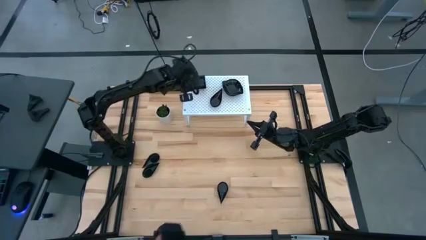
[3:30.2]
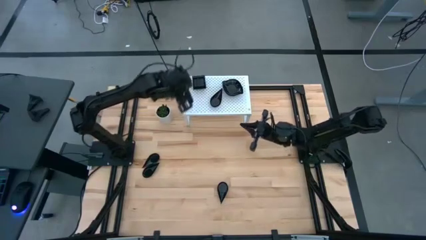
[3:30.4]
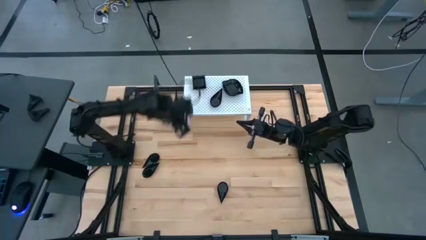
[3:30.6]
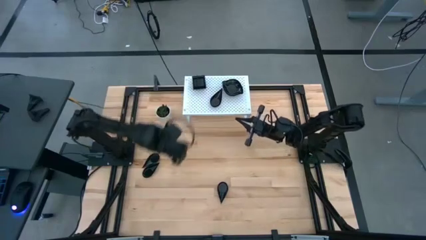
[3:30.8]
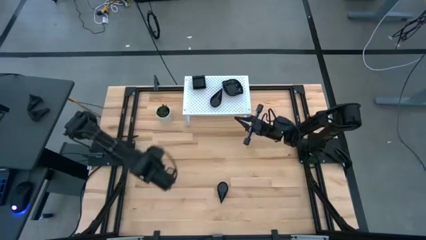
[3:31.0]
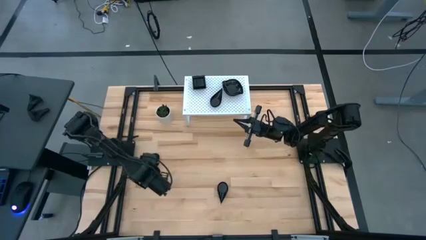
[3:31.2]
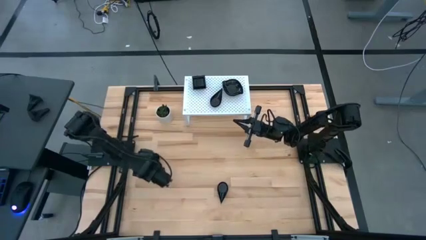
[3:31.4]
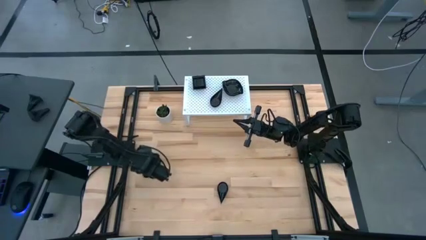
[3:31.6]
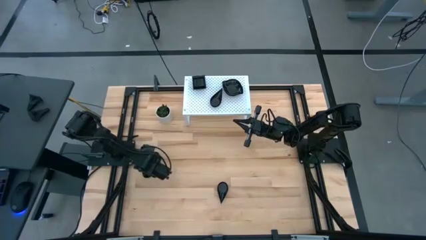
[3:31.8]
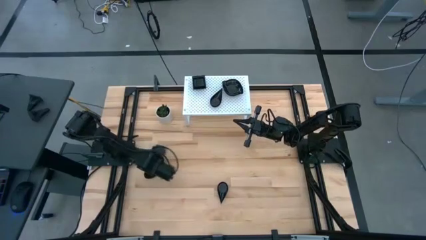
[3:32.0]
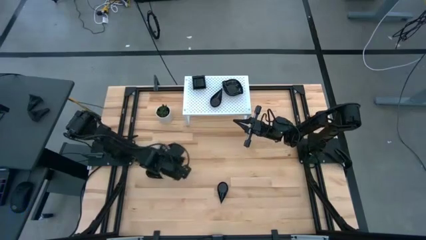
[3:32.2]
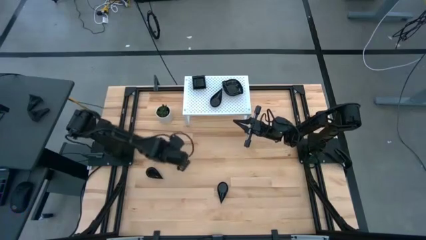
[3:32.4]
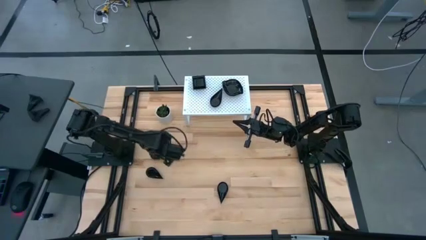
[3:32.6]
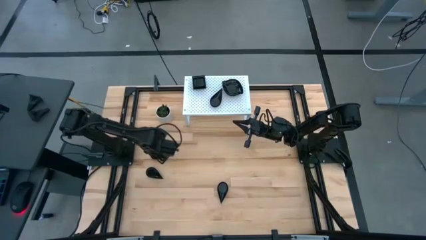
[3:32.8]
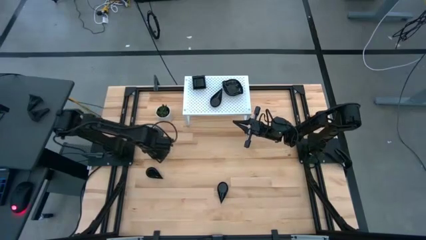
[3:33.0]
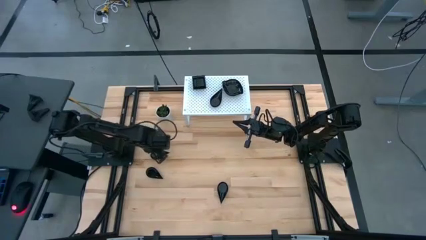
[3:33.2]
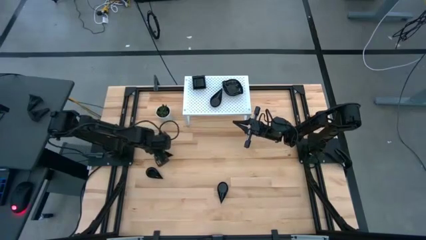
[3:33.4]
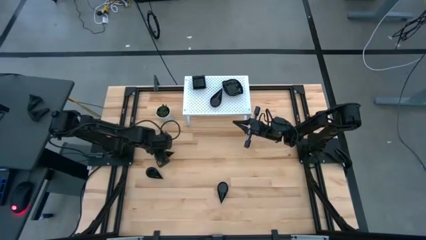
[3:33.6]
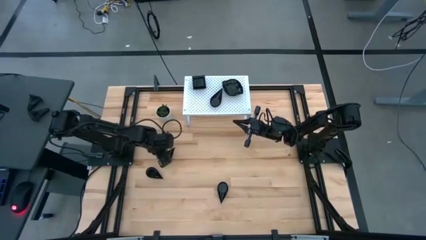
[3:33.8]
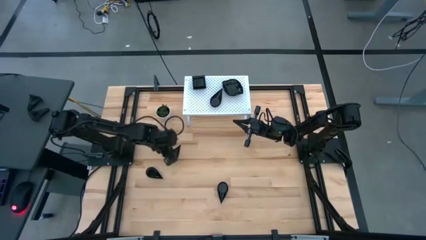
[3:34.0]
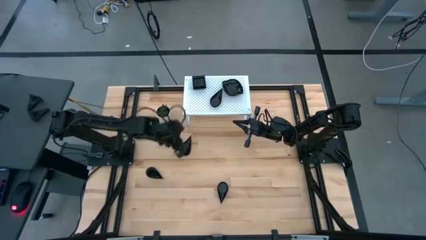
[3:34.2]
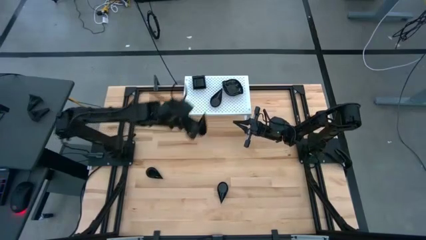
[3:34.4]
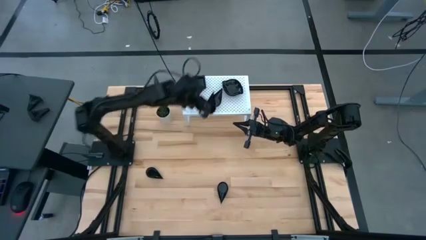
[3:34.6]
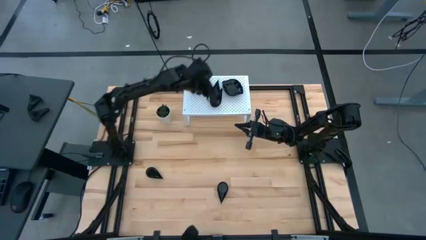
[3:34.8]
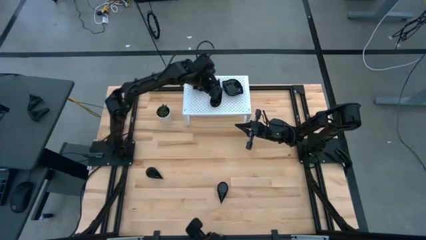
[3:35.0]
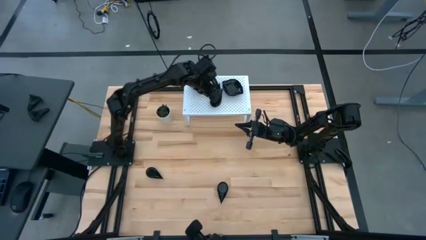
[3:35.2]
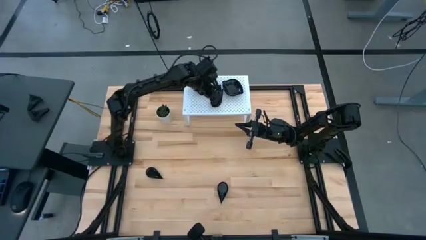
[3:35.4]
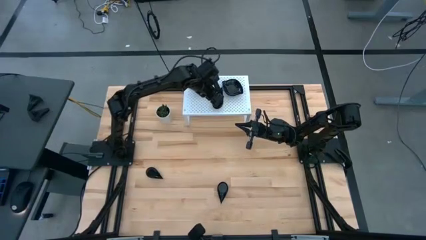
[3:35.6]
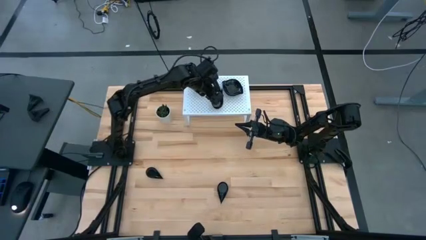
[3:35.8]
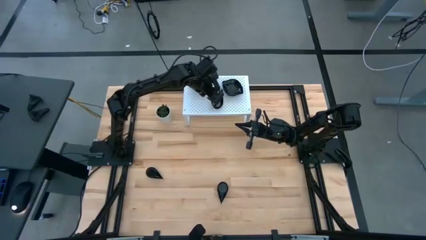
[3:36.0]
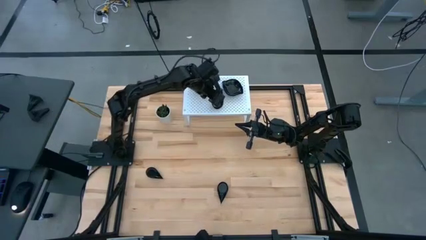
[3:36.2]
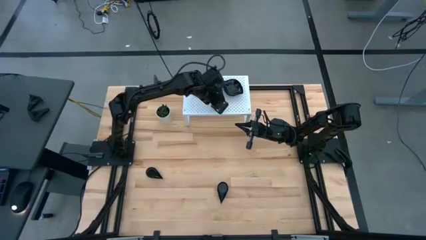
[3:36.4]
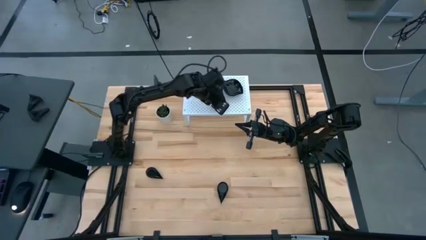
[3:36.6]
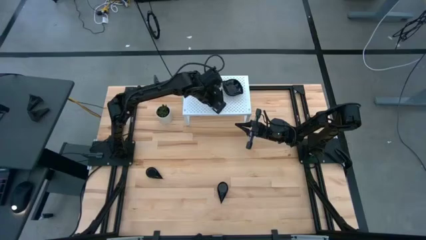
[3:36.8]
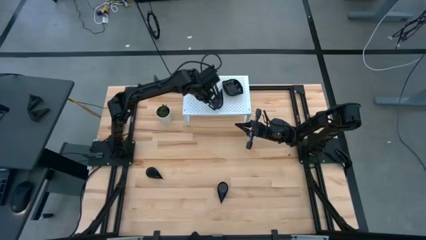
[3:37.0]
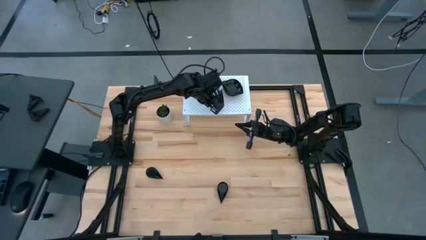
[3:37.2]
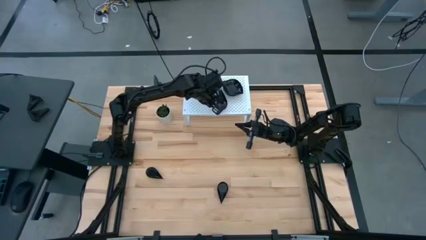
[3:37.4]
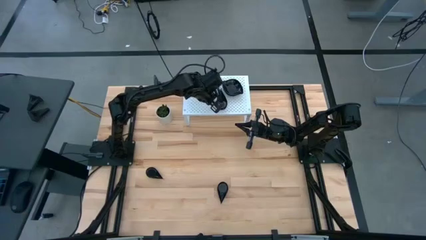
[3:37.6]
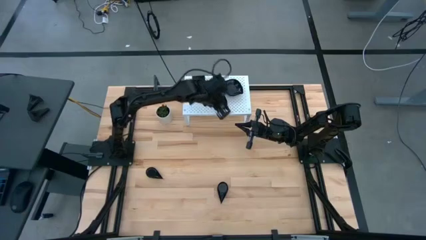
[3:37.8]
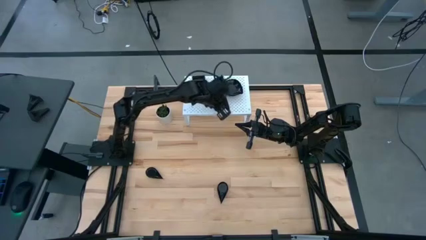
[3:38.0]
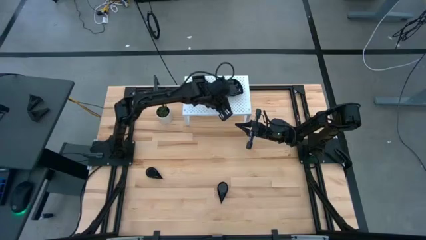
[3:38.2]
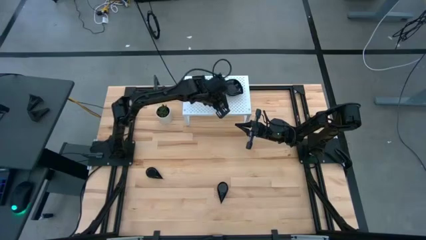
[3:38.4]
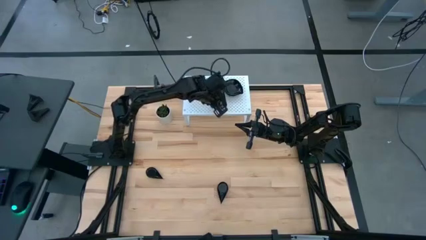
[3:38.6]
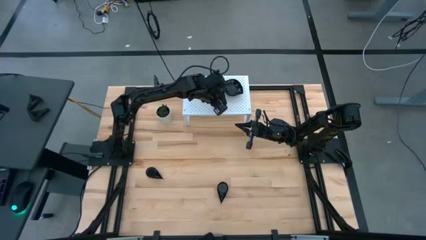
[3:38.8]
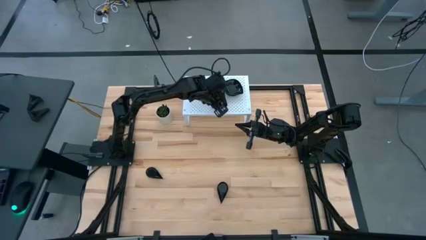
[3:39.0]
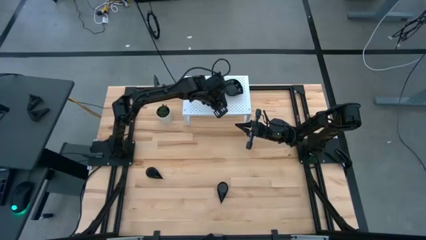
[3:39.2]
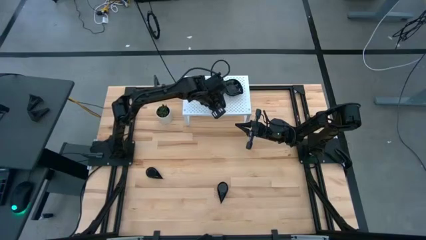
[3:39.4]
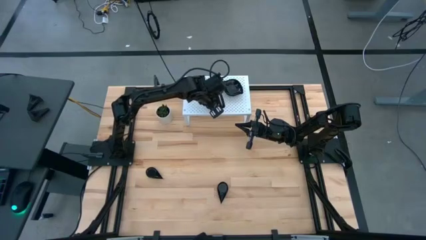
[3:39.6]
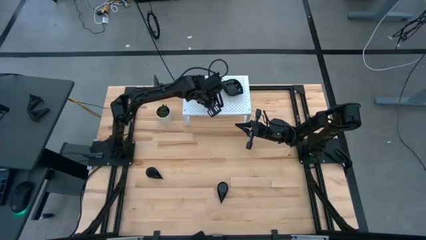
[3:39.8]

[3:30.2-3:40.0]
Task: Pick & Place Mini shaped plates
Stack the black plate on top of the black plate on the shelf

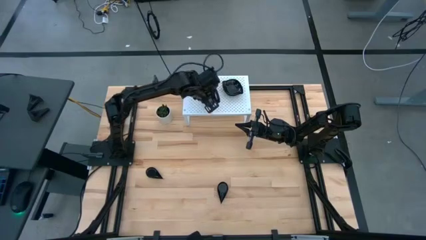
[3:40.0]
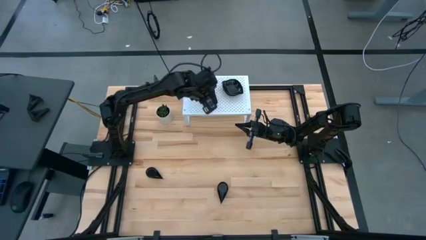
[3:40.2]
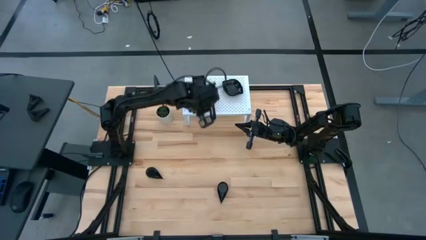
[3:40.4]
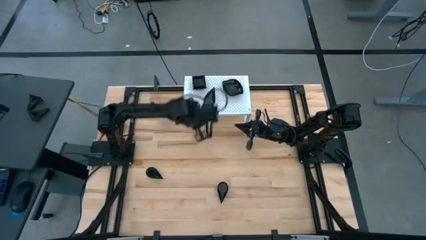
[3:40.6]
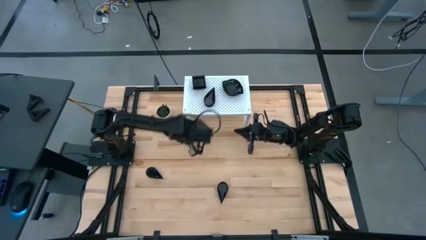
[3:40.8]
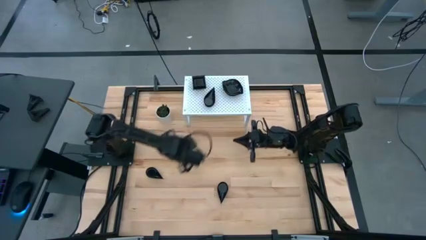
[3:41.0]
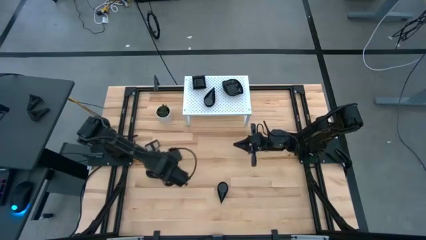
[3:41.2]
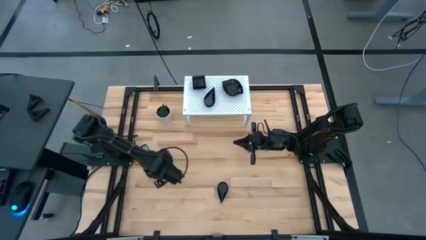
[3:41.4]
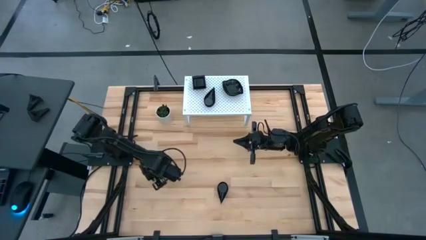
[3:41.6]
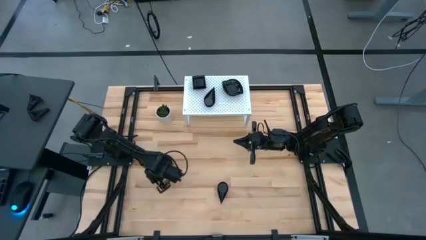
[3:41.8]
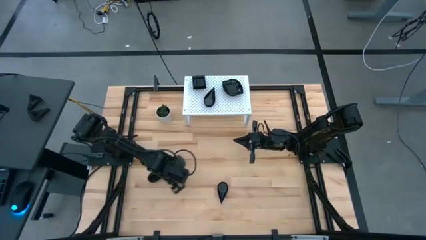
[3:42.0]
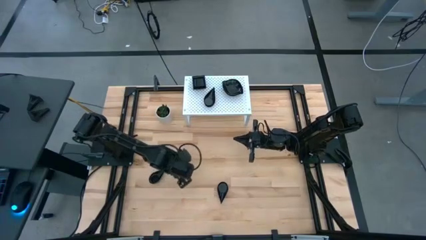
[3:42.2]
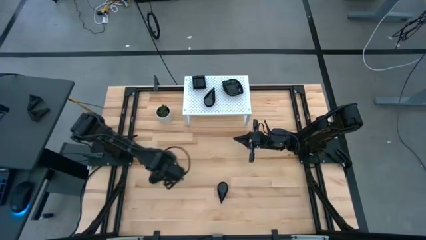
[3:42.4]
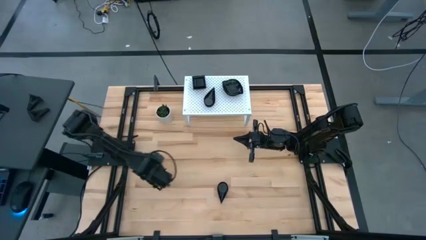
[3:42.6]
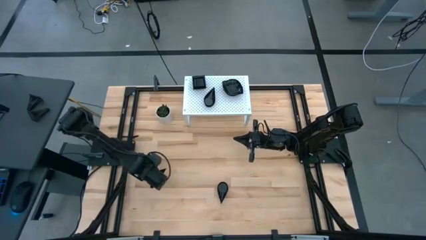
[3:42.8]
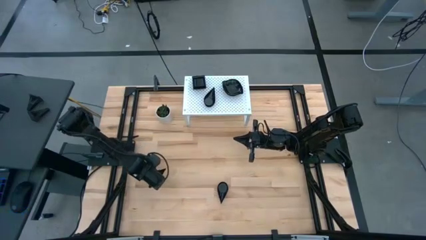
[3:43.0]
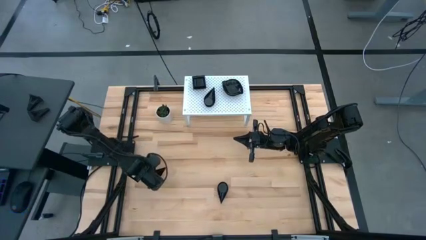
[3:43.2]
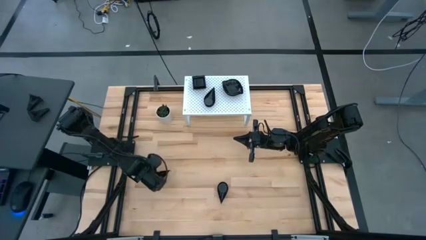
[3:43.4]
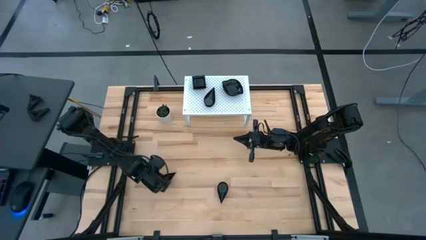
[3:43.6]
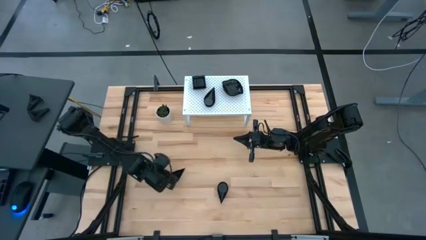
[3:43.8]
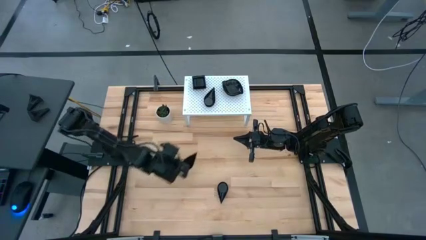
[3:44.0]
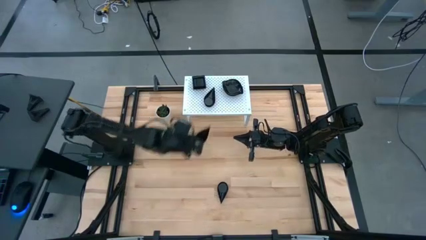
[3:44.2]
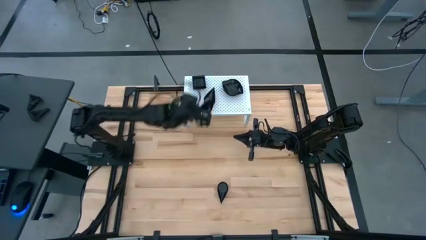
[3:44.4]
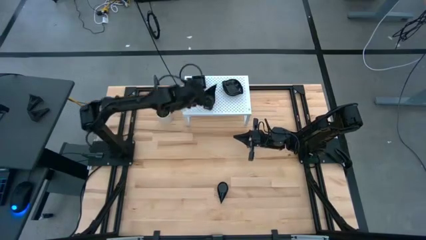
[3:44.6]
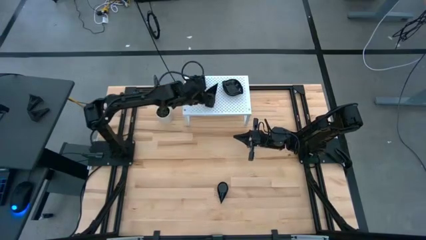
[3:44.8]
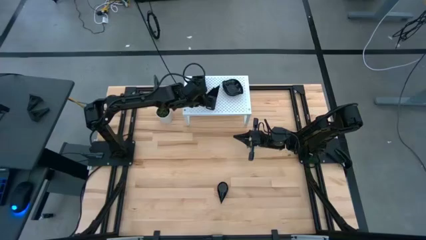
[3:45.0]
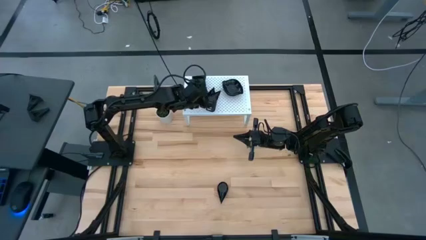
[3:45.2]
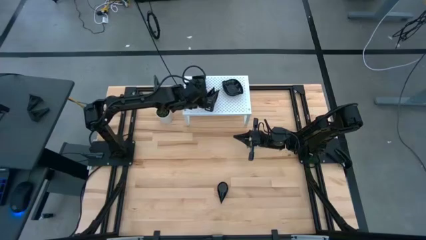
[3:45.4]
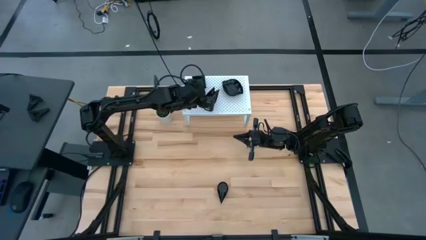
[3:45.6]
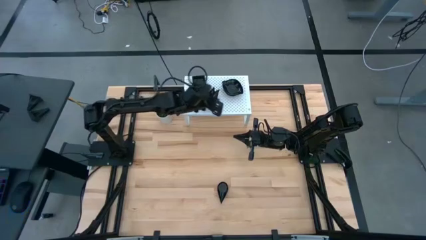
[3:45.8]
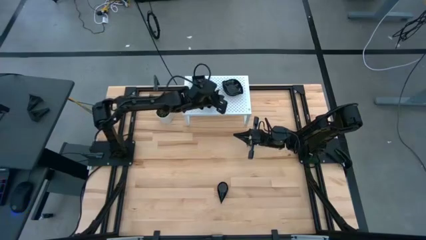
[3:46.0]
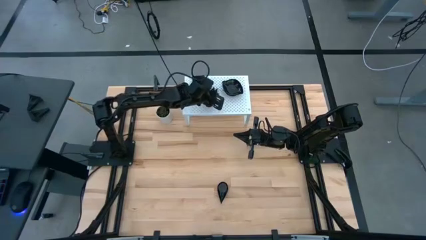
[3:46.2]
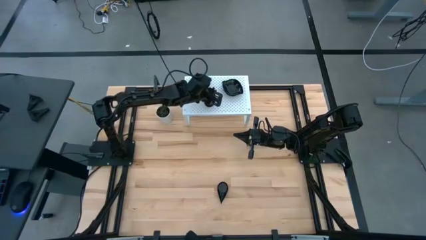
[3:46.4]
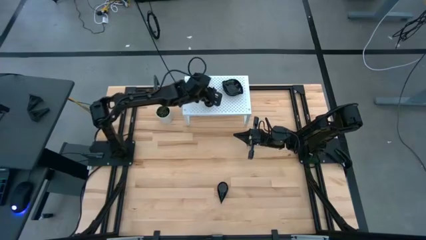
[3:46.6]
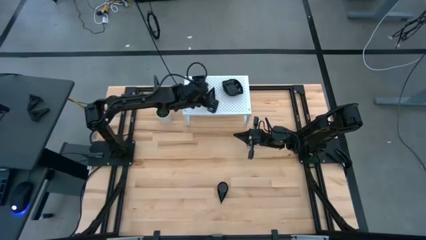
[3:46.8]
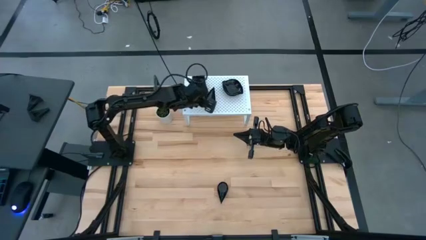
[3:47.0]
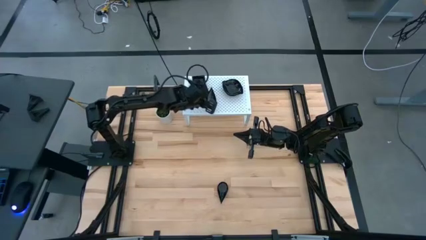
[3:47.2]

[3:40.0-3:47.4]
Stack the black plate on top of the black plate on the shelf
